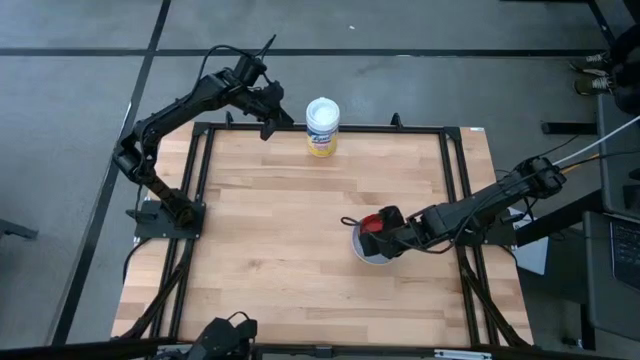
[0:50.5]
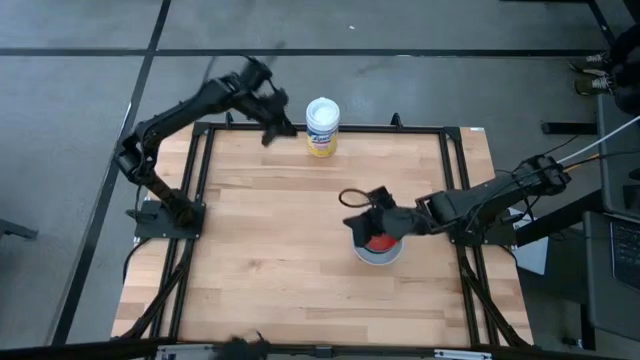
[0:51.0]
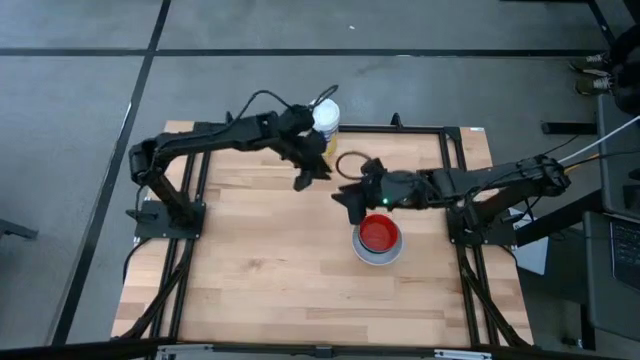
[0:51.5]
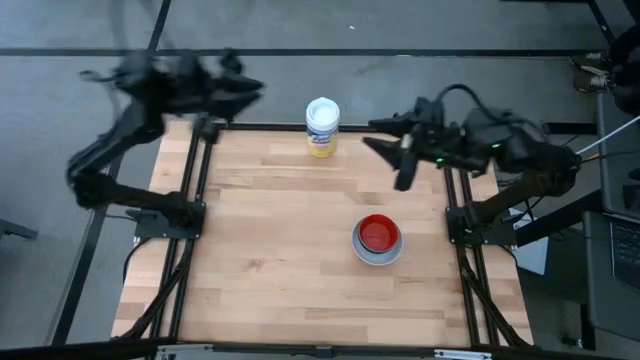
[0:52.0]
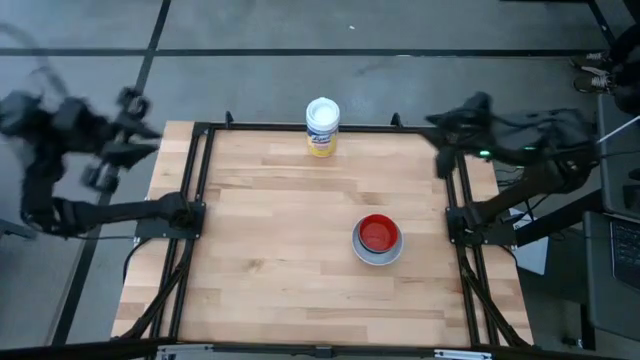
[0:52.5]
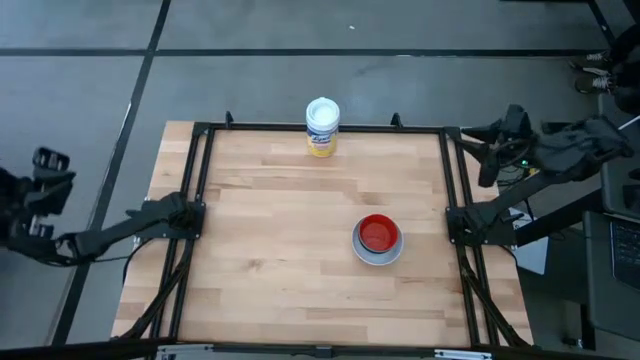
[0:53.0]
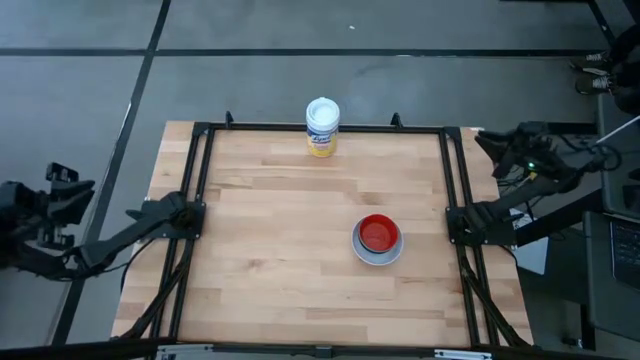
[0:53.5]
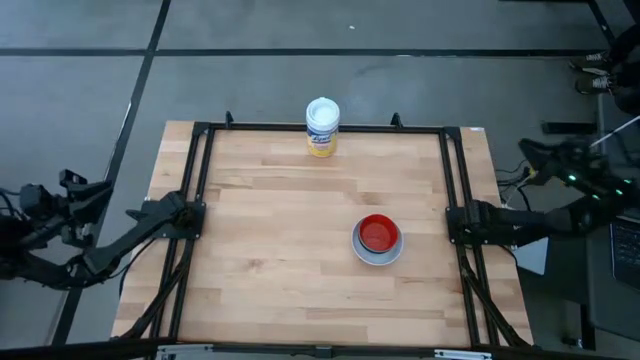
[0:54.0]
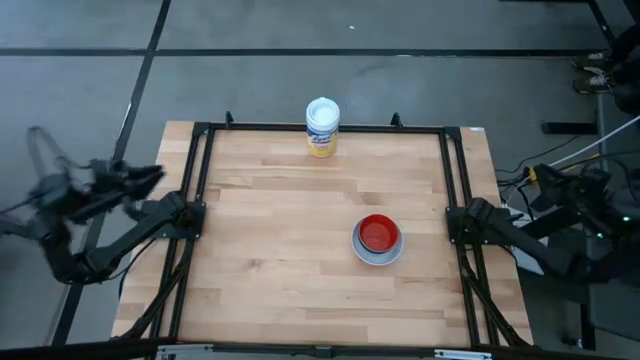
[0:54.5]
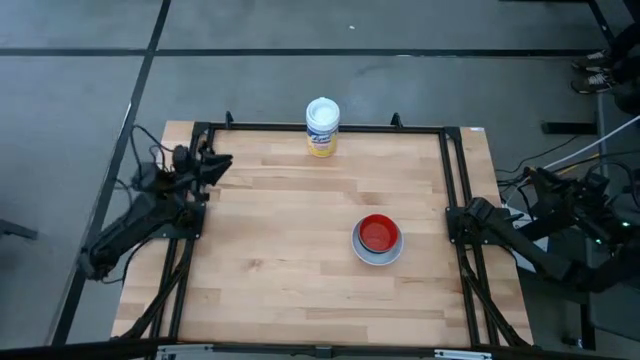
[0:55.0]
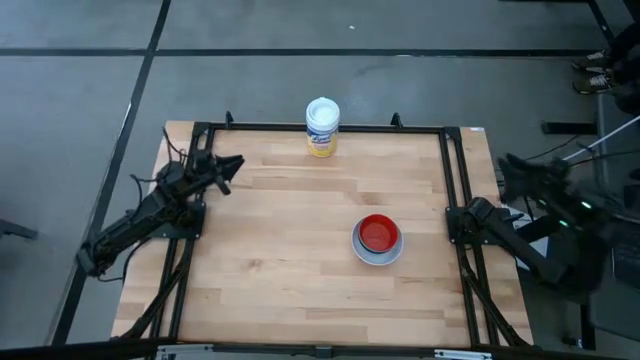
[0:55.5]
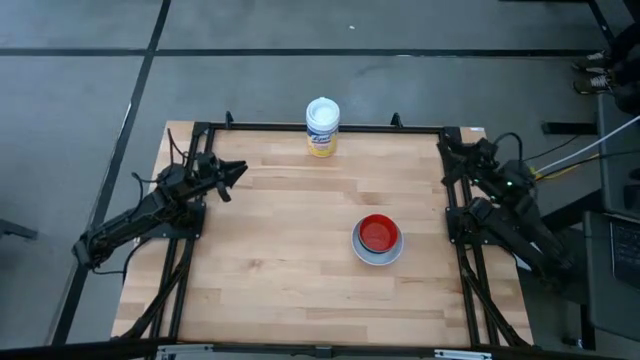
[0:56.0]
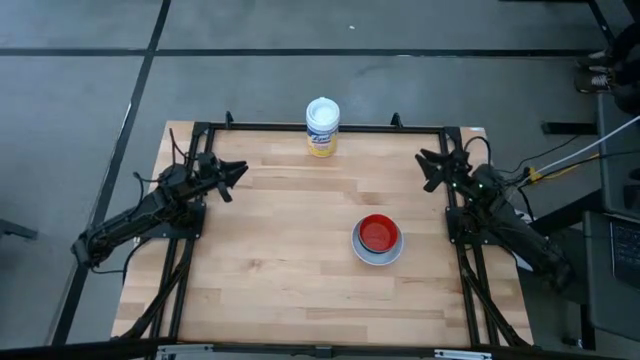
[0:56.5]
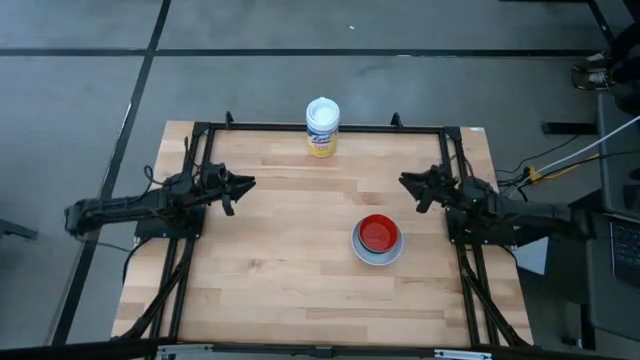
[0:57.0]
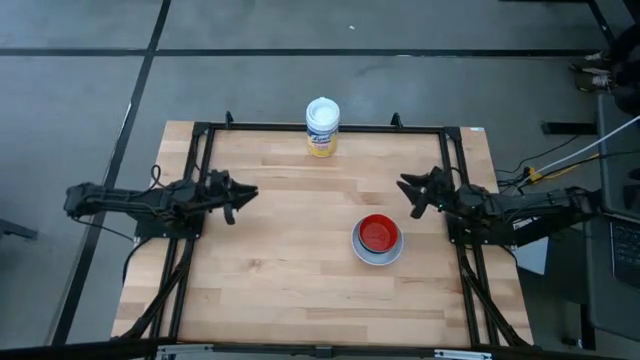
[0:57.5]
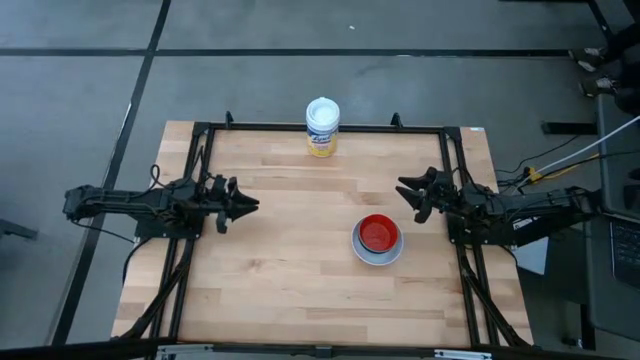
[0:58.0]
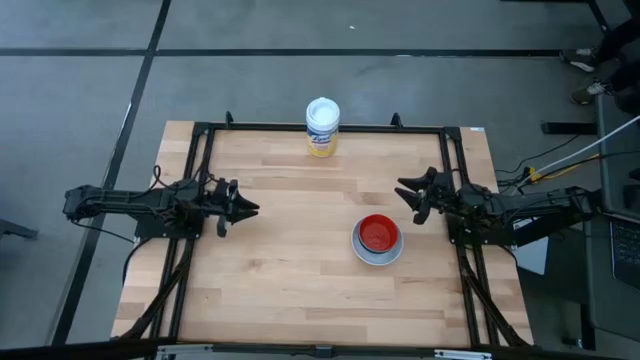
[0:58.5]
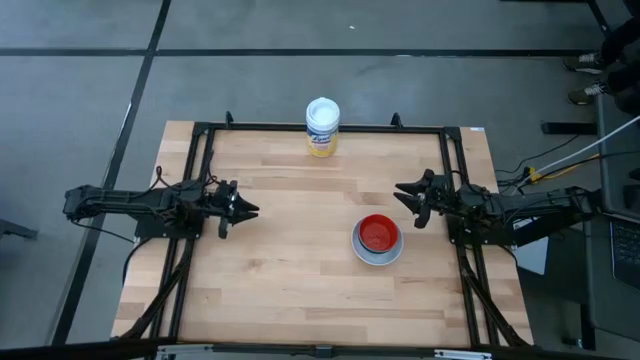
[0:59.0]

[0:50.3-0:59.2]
Return to Home Position
